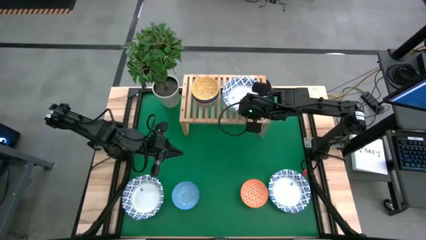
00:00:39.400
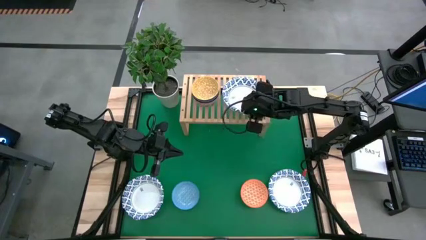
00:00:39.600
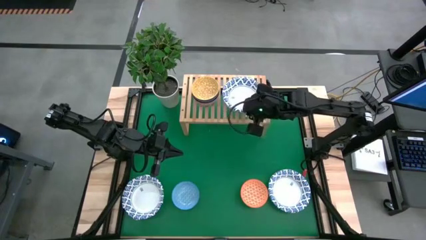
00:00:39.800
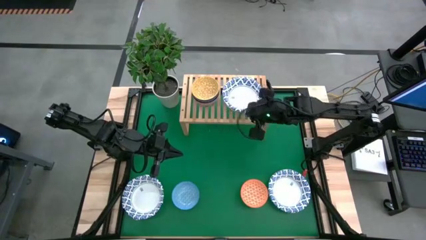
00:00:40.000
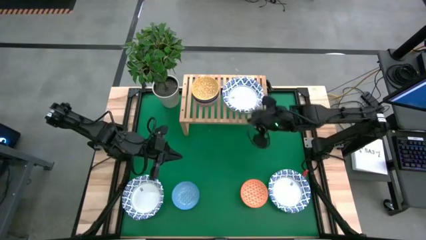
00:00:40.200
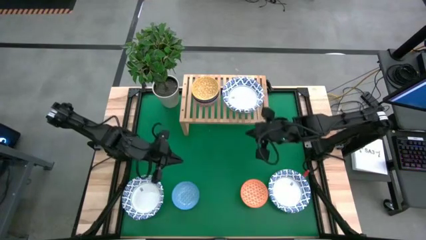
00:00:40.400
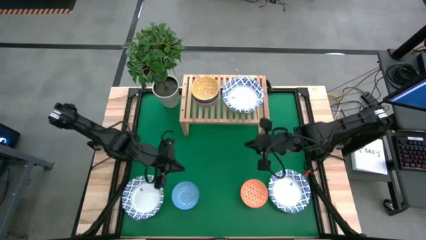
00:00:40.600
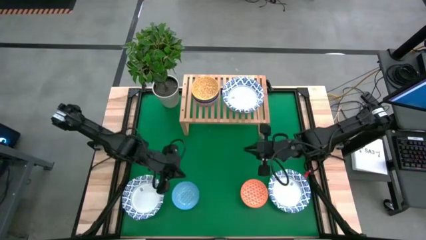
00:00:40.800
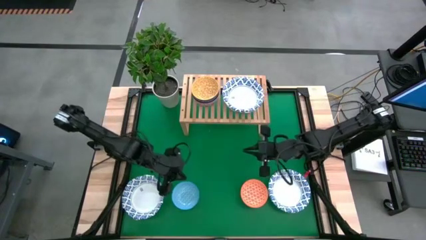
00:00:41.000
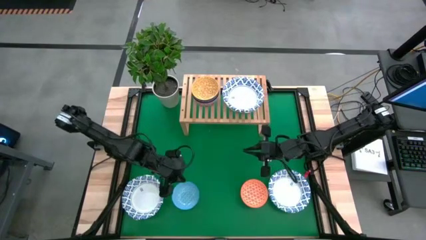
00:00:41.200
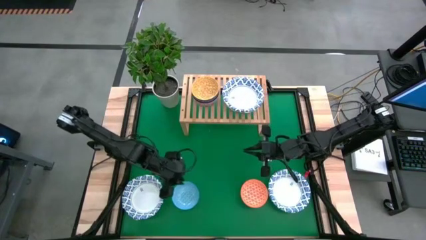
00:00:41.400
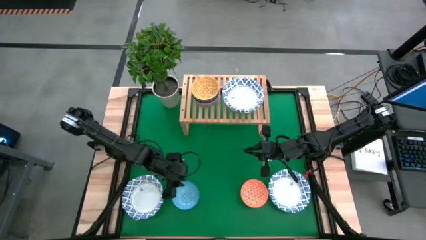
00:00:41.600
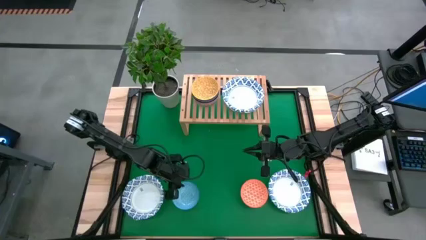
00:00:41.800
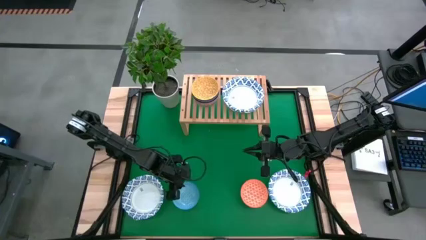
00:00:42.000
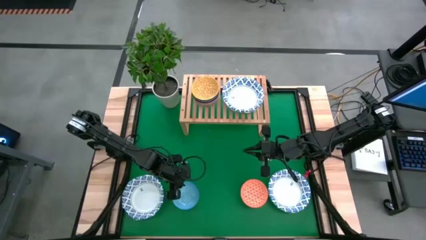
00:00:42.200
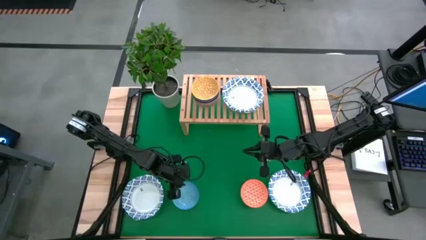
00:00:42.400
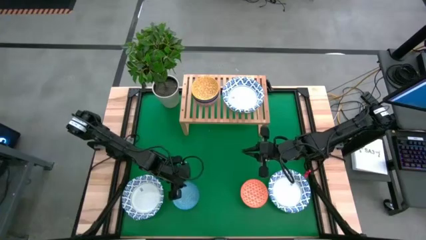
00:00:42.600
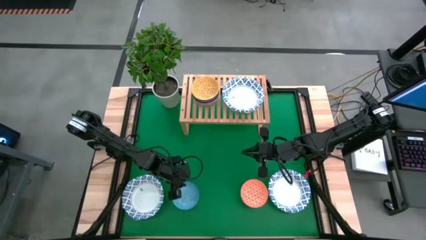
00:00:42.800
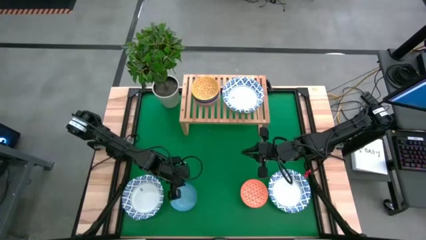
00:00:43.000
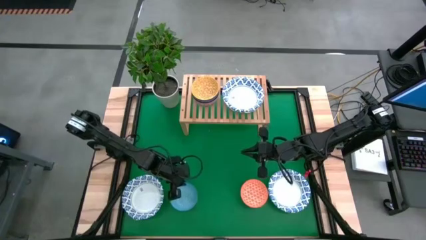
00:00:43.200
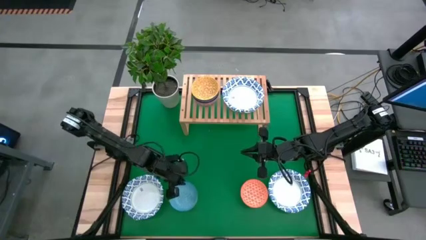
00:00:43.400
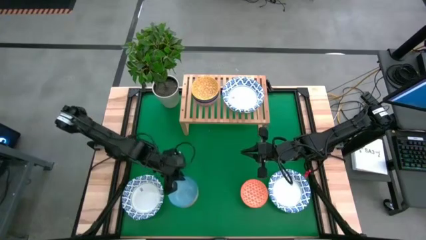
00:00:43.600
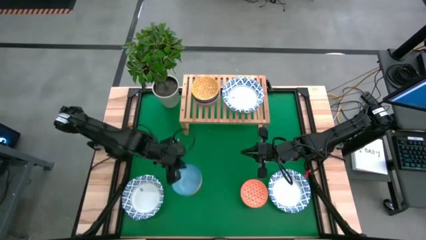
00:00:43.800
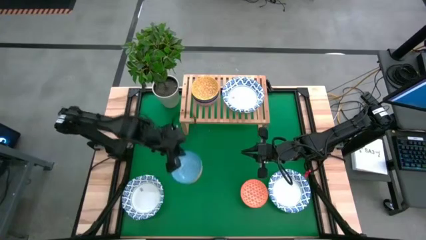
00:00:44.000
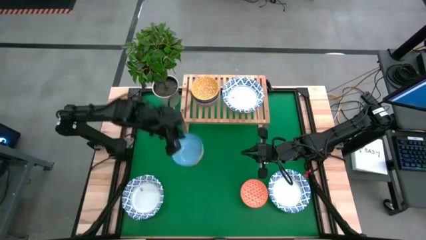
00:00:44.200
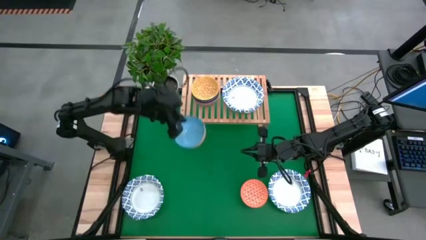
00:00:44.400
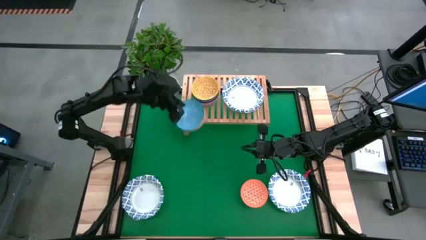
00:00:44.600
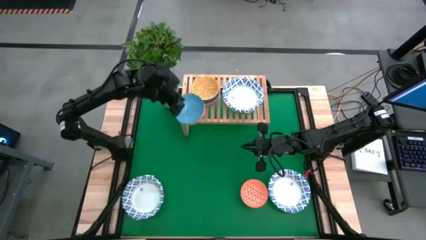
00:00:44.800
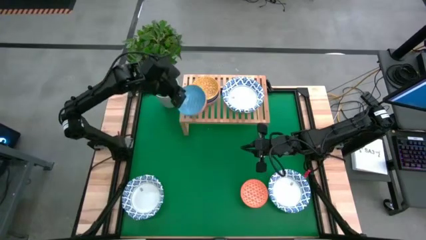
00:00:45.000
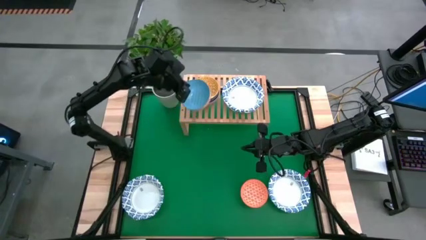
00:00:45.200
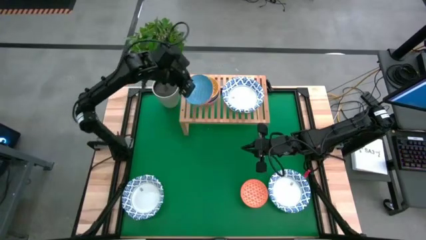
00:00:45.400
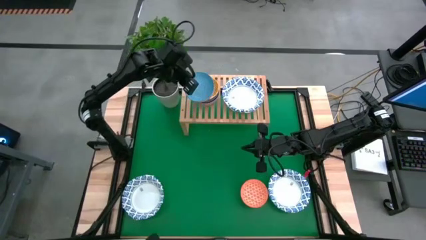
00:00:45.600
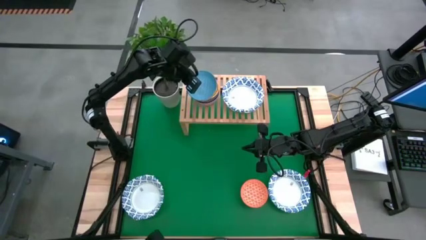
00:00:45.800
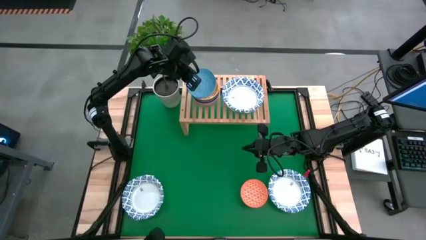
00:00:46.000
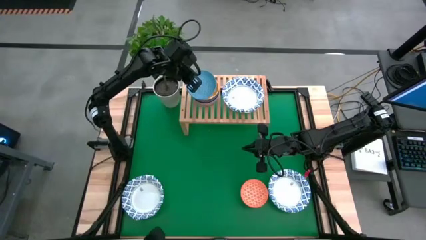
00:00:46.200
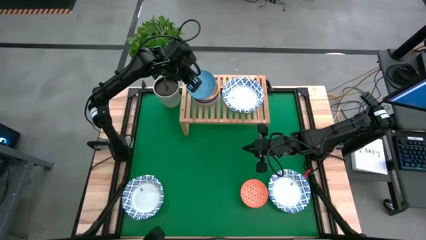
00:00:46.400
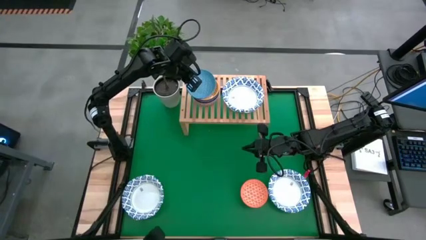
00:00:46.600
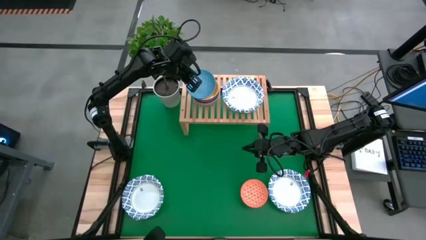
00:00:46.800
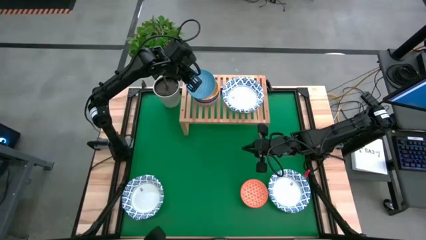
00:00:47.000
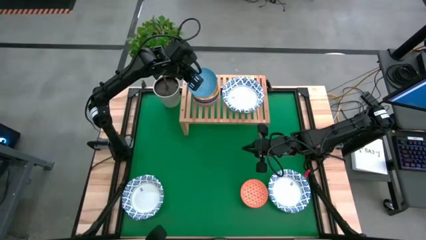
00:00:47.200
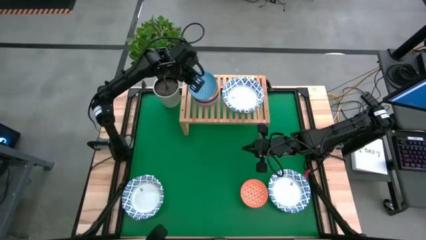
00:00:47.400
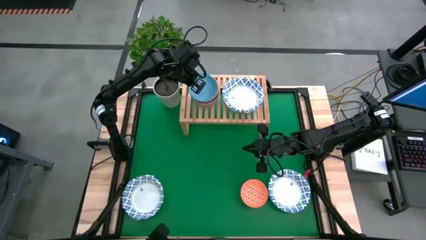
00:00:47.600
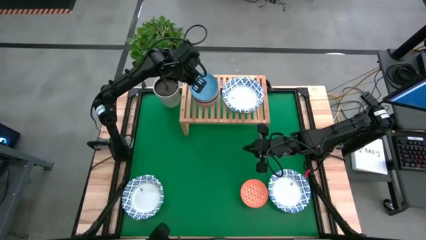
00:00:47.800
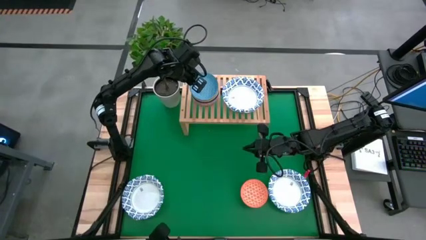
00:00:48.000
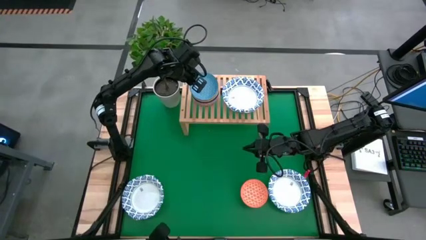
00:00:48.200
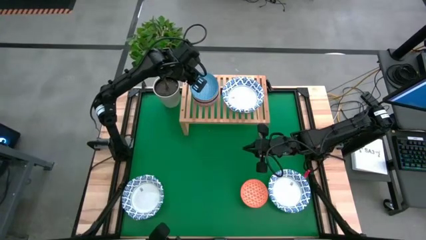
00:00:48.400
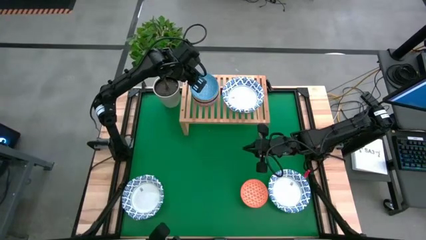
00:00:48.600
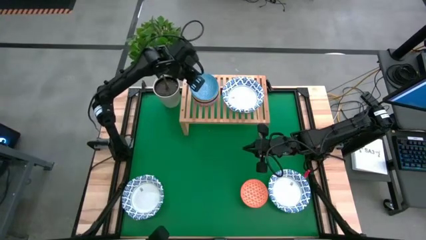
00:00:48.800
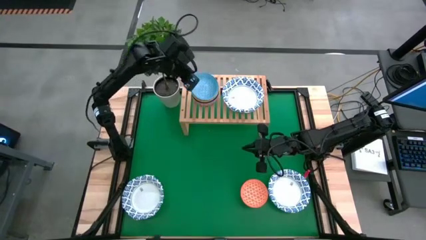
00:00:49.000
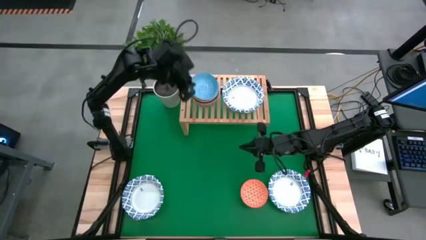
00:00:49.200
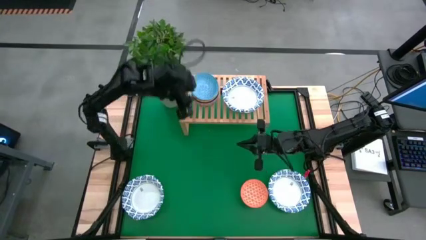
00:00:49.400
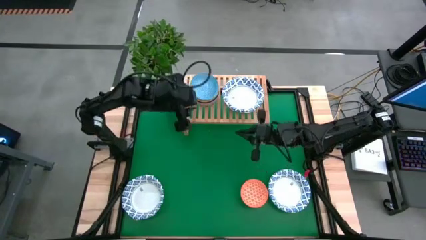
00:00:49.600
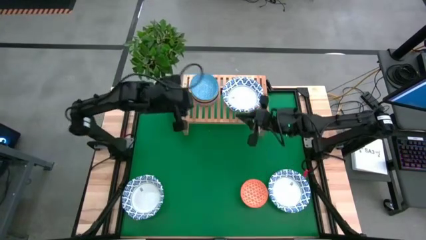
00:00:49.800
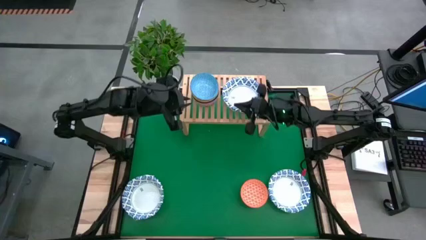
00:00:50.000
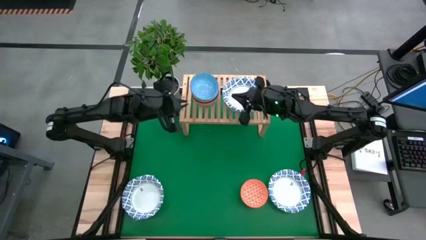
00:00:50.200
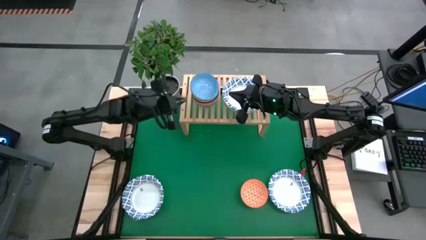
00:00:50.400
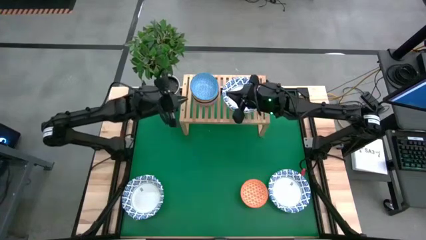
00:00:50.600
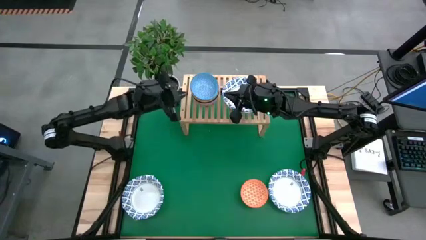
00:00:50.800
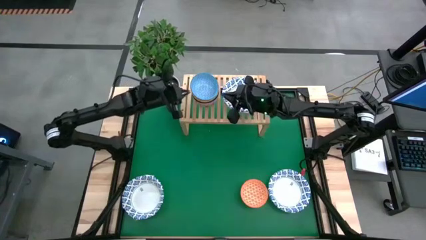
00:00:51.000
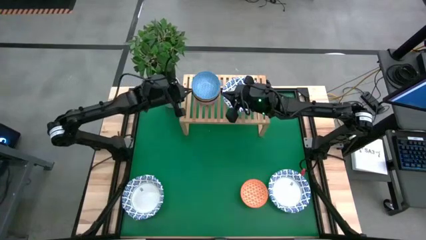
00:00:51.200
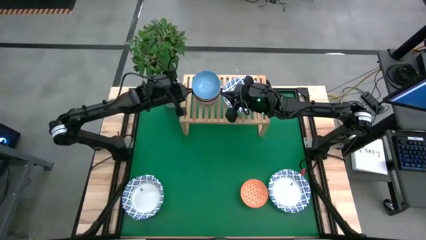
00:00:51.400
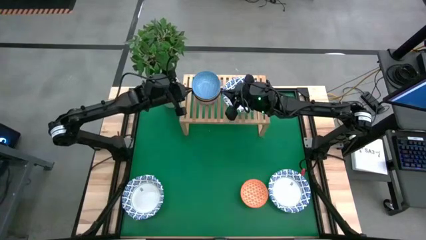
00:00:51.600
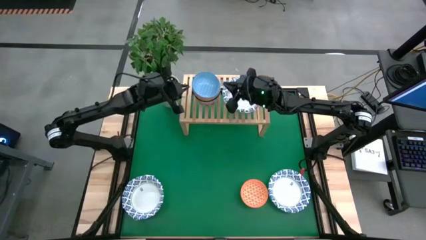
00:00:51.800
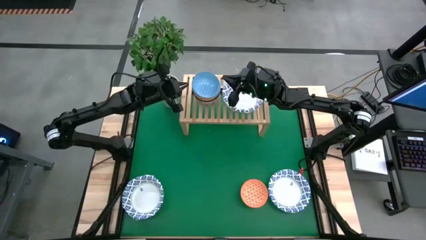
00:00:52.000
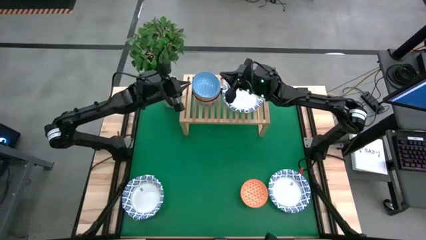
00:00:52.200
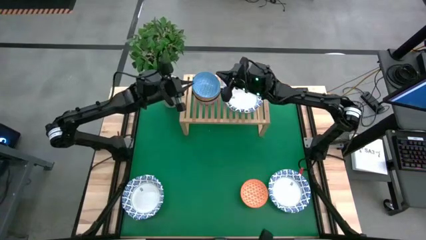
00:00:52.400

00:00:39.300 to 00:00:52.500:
Task: Place and stack bowls onto a shelf
Stack the light blue bowl on top of the yellow bowl on the shelf

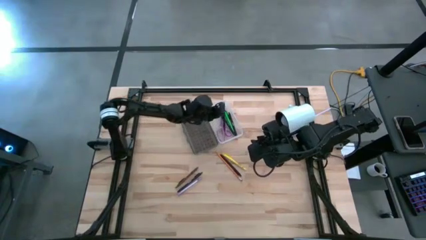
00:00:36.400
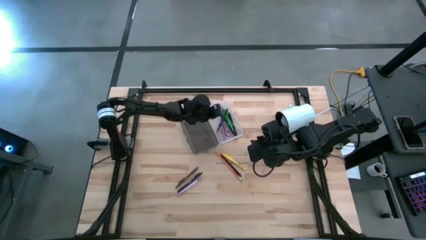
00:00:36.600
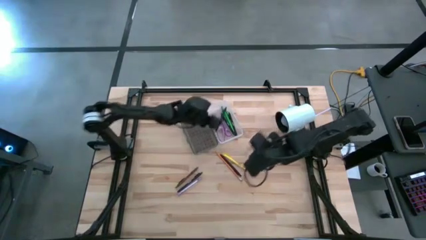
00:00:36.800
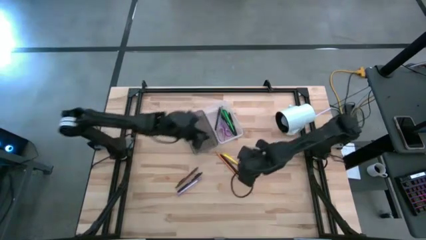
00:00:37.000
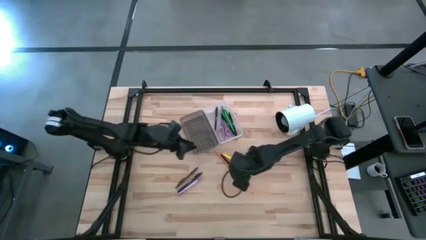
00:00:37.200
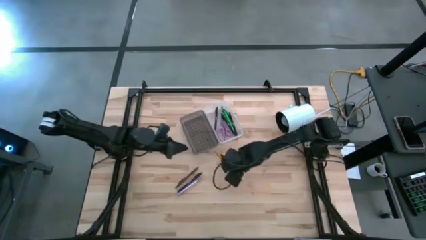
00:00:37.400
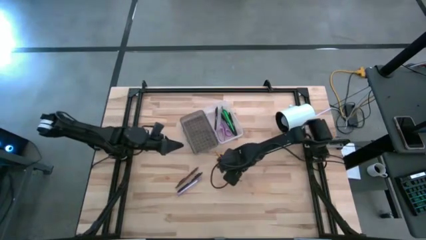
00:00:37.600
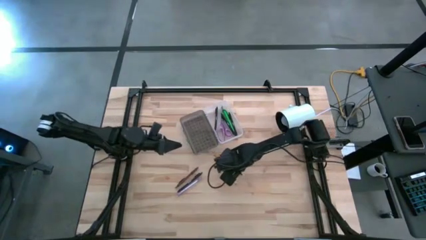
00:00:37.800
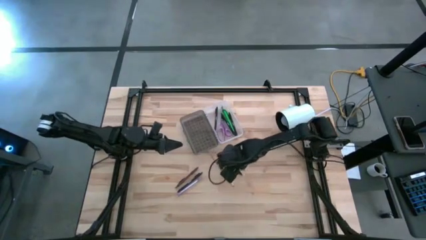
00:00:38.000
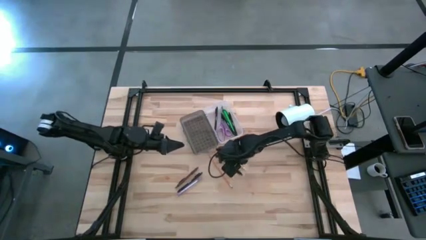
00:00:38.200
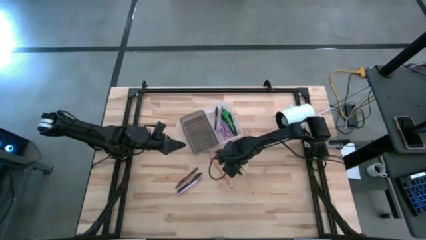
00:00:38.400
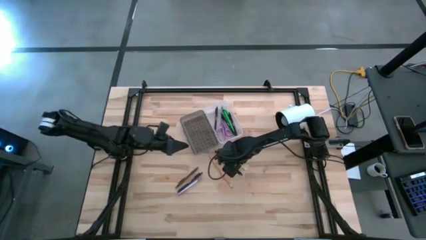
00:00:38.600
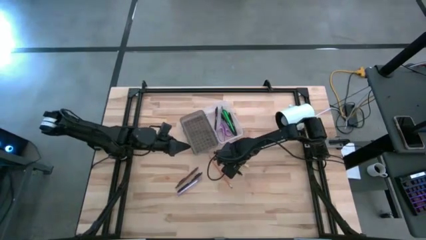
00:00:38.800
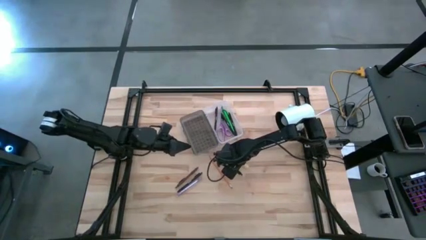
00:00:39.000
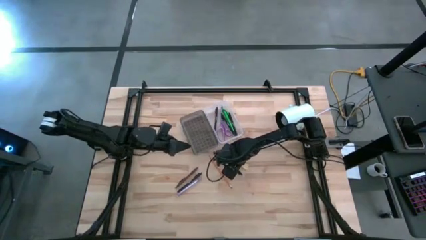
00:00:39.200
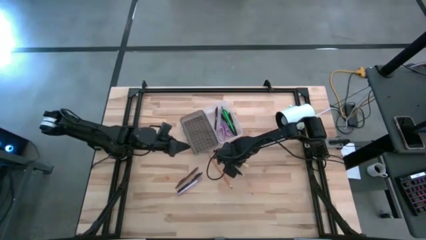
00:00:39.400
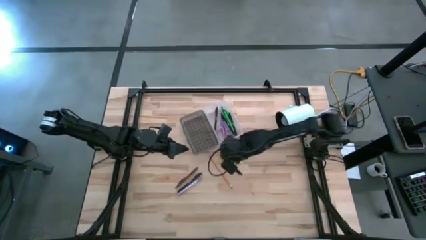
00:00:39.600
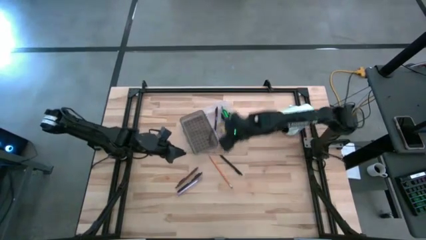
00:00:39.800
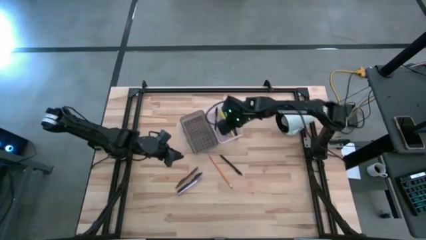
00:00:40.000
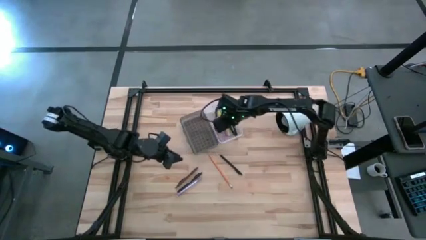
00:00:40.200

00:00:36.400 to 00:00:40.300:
Task: Pick & place school supplies into a supply box
Put the yellow pen into the black supply box
